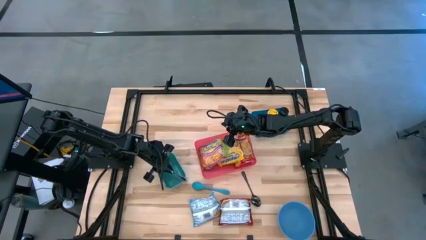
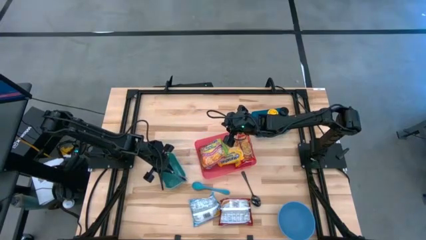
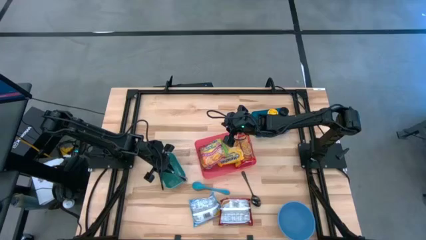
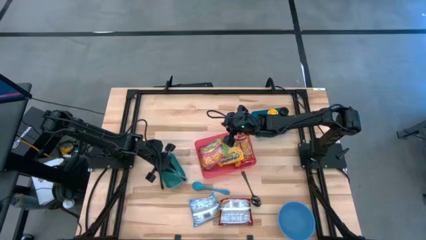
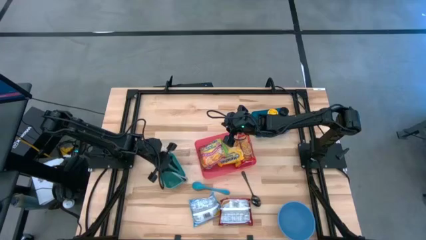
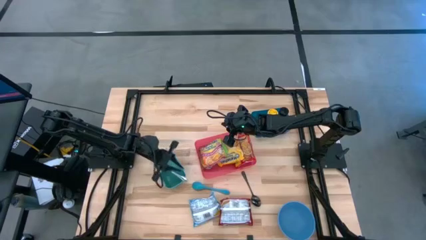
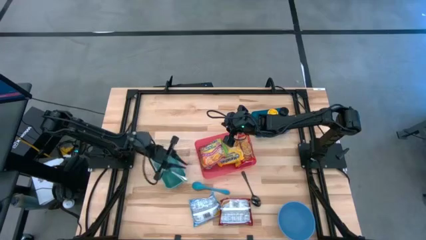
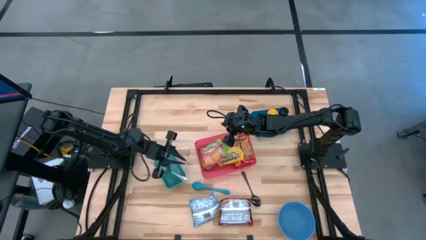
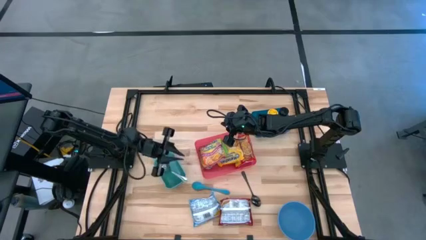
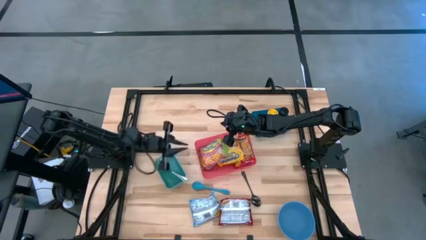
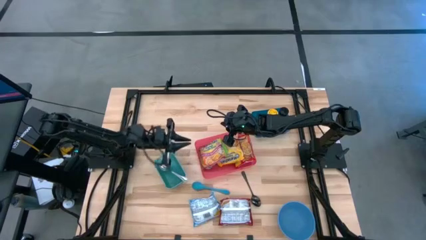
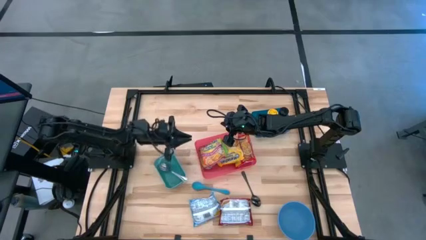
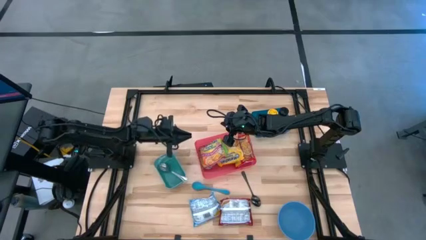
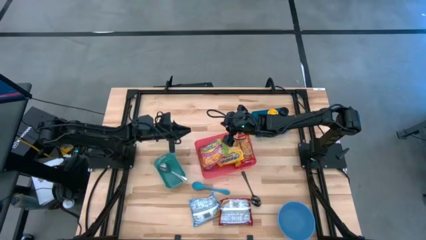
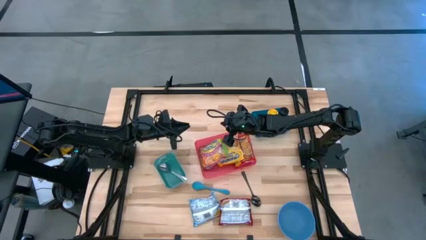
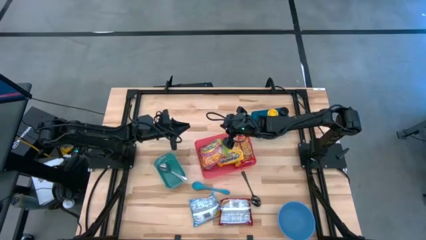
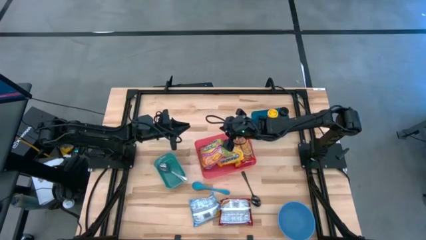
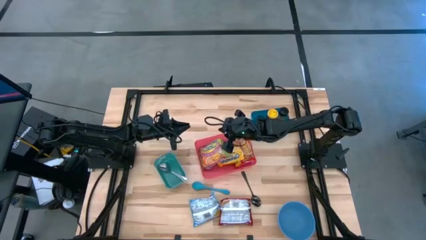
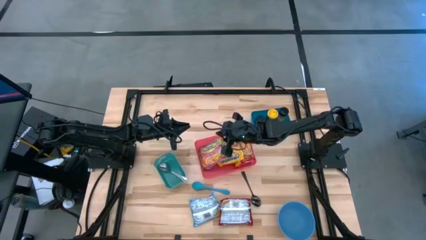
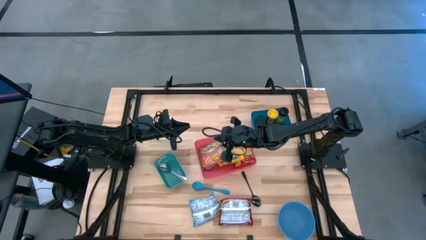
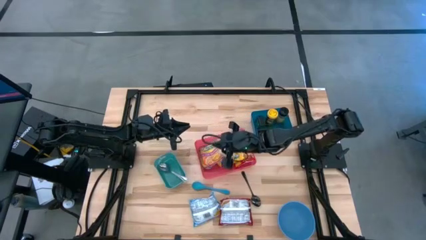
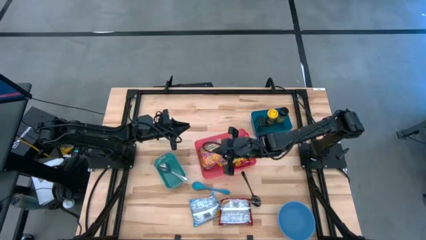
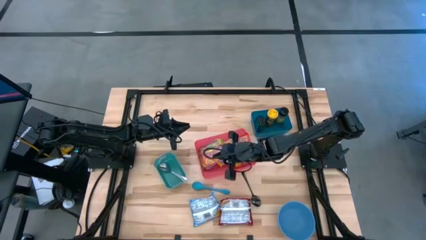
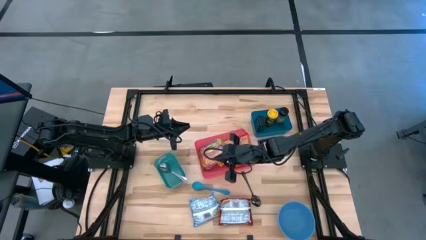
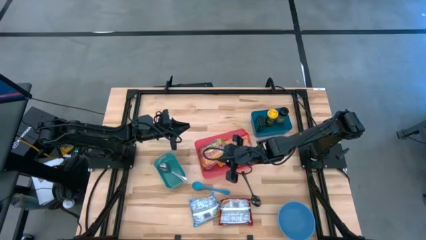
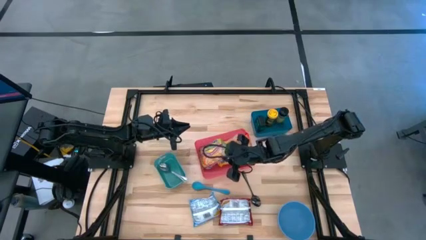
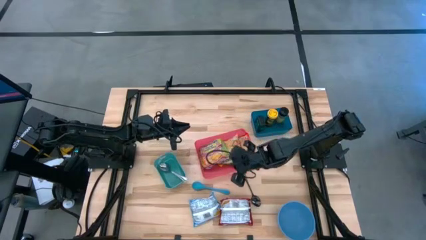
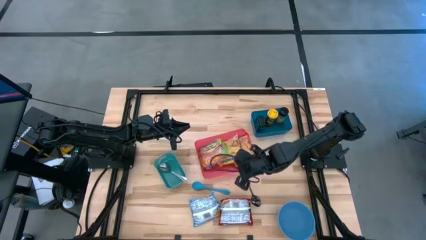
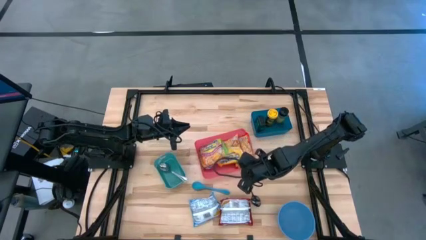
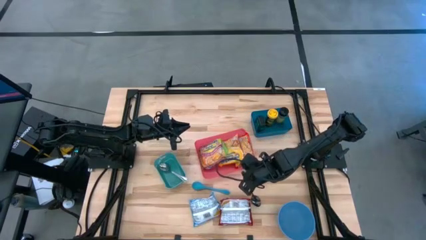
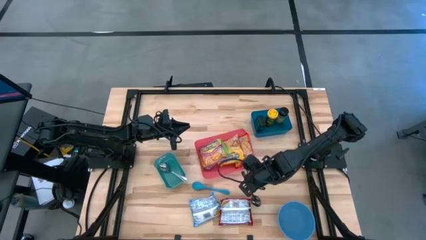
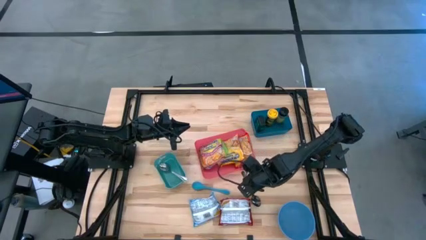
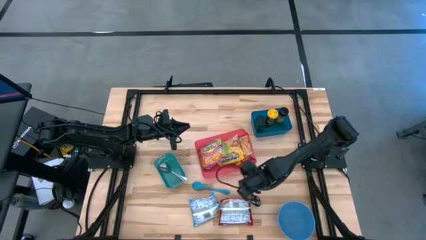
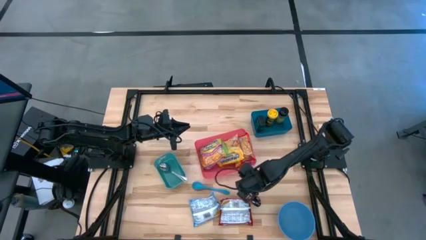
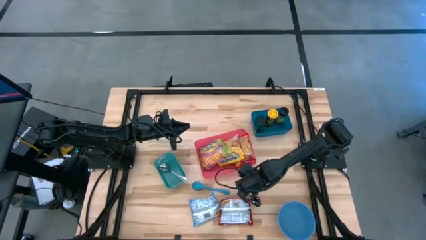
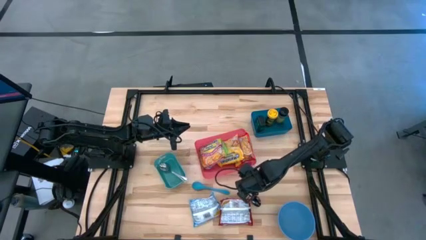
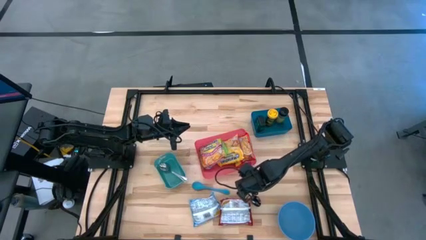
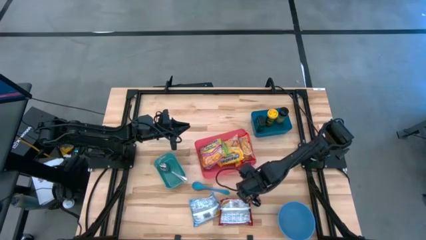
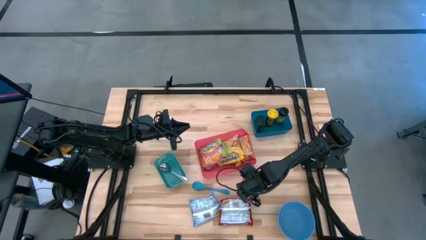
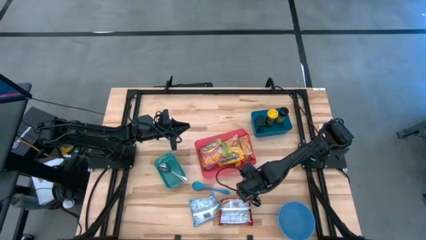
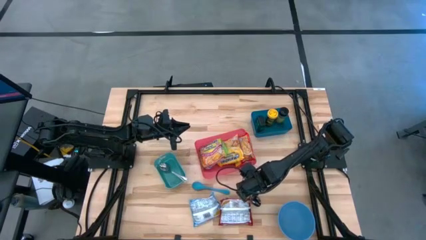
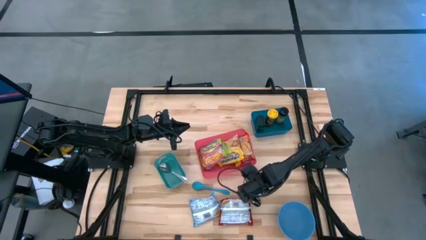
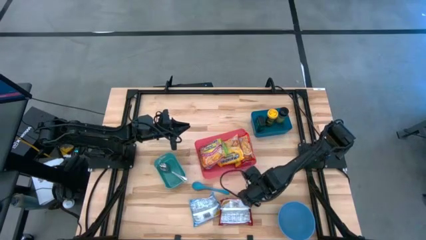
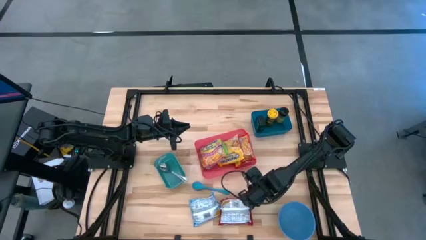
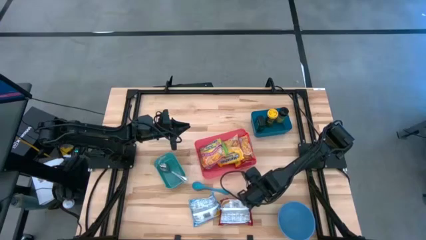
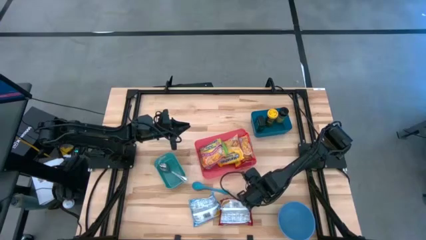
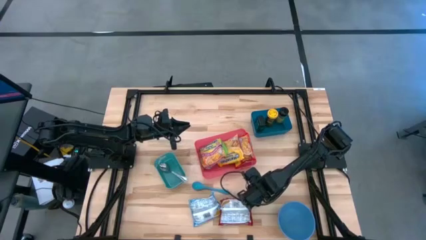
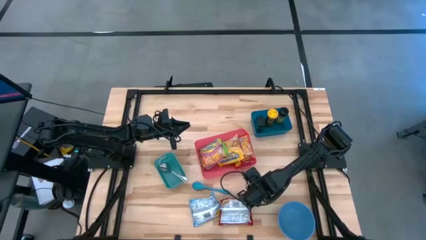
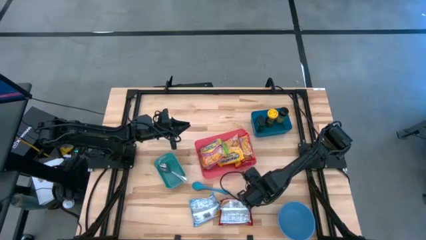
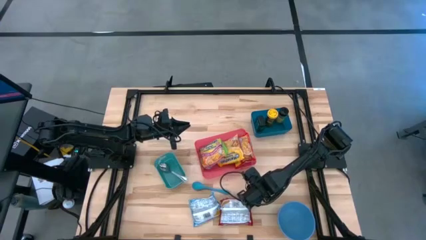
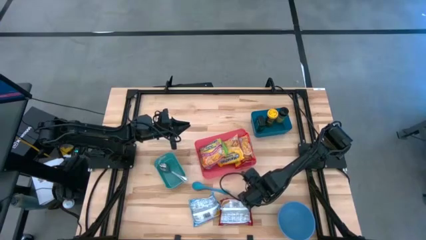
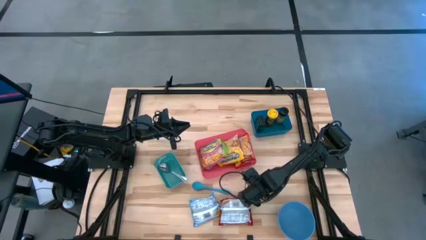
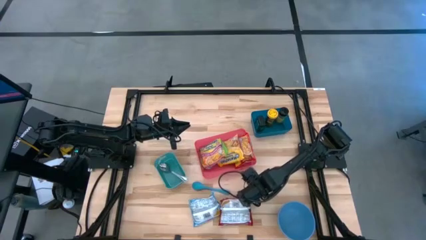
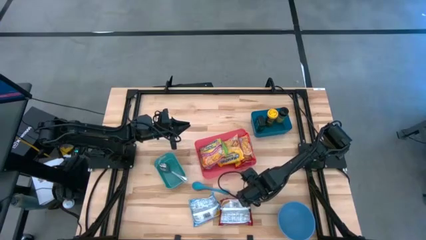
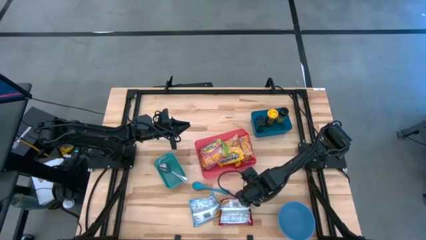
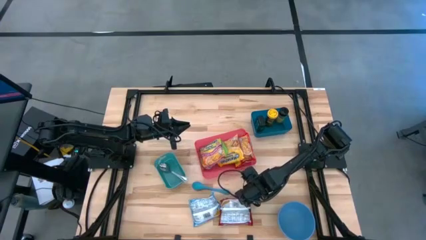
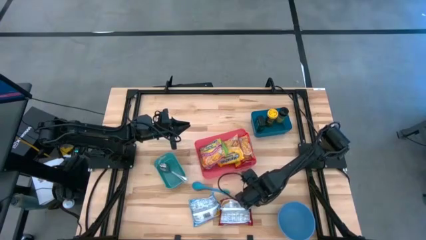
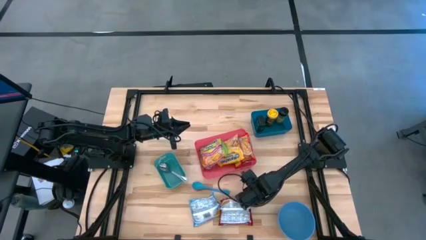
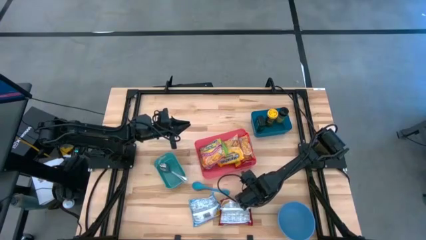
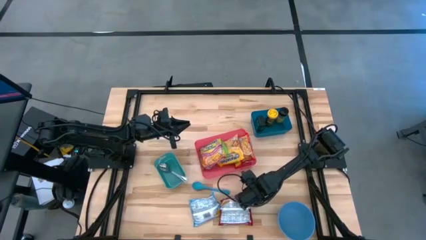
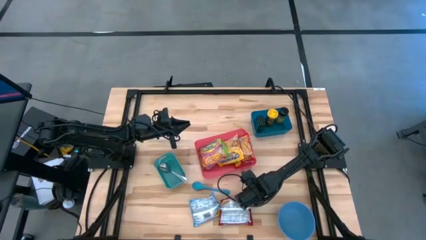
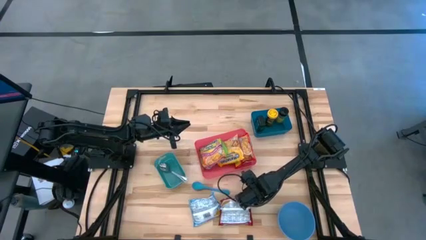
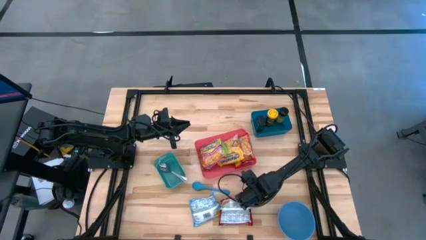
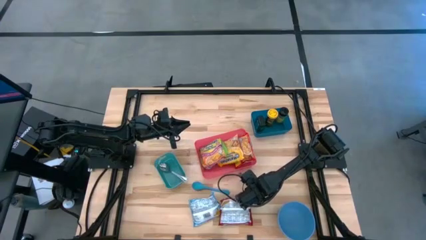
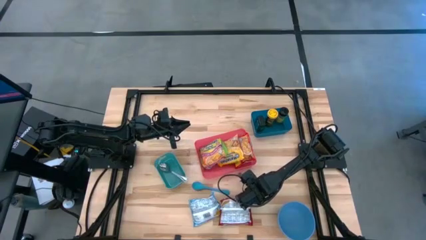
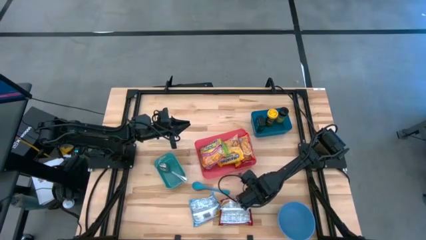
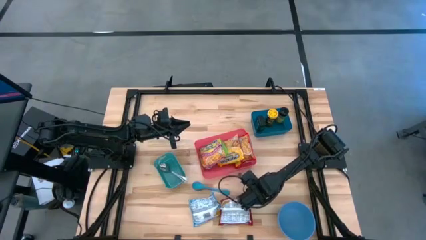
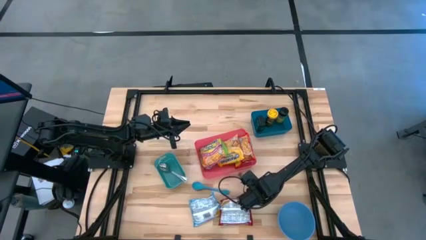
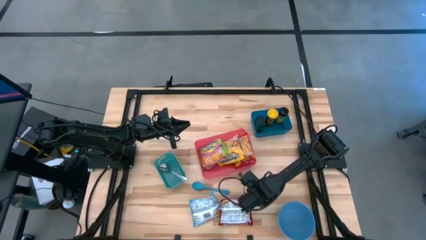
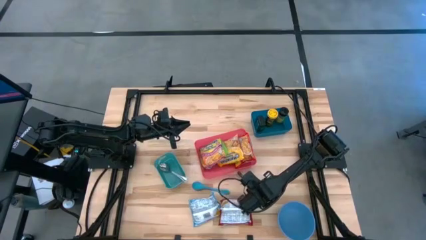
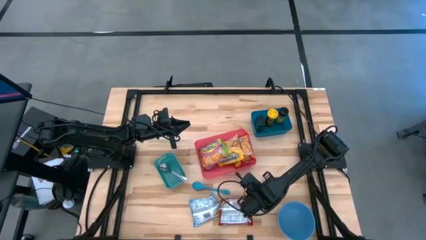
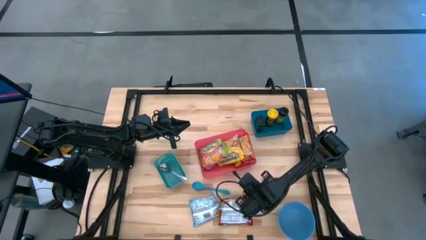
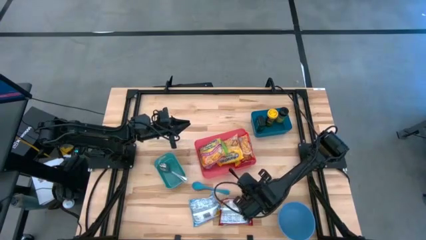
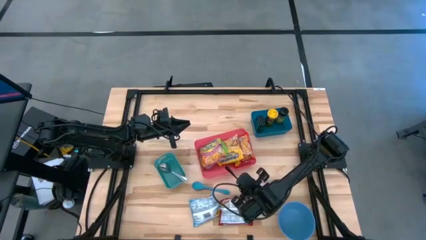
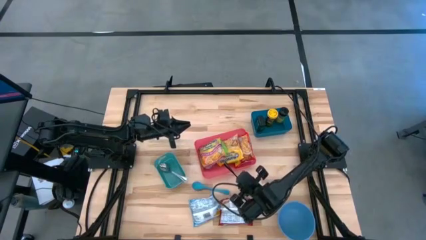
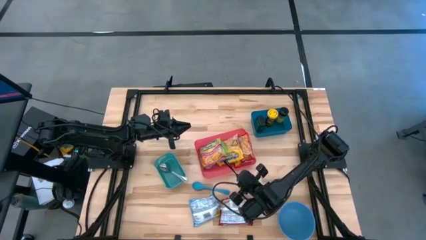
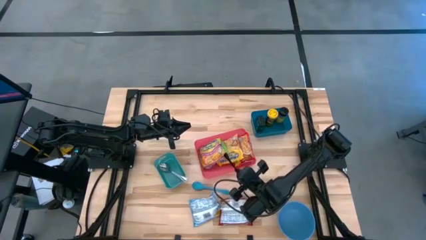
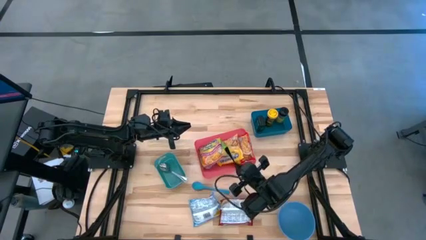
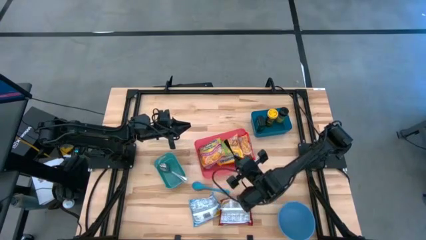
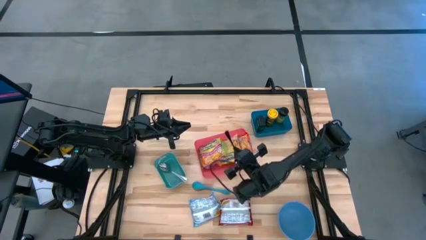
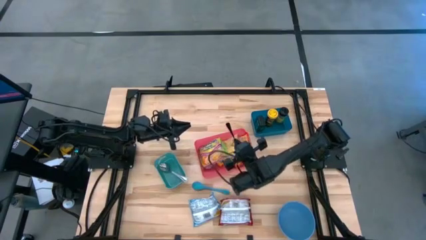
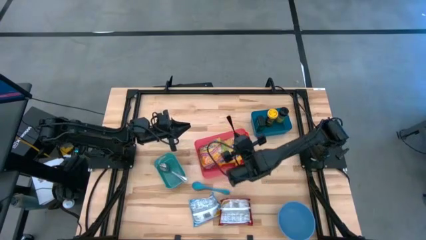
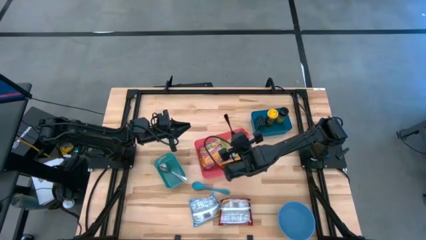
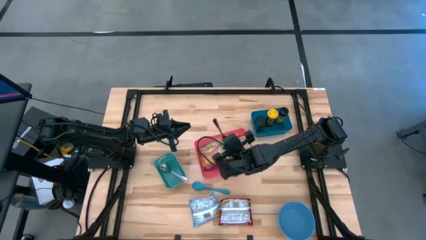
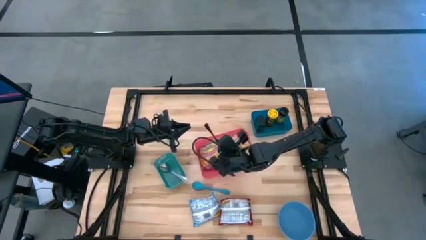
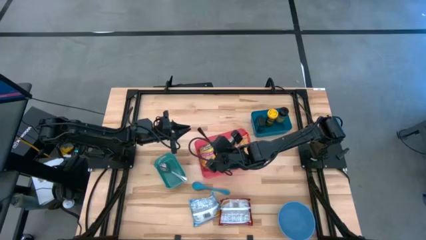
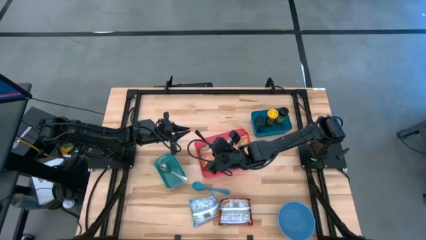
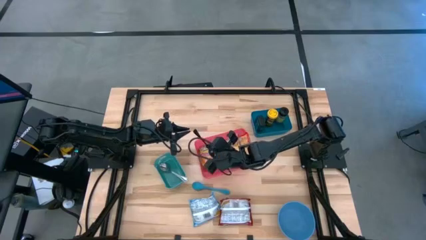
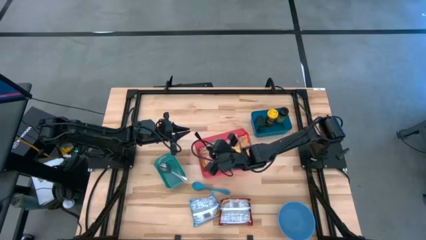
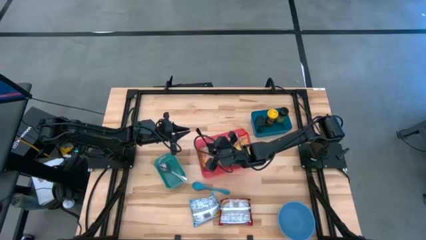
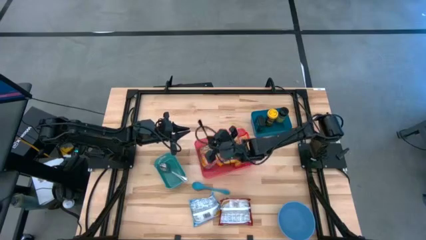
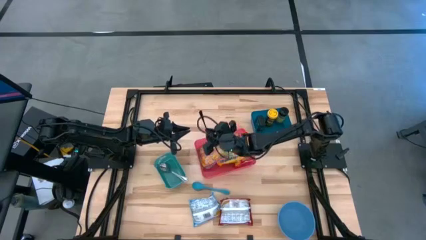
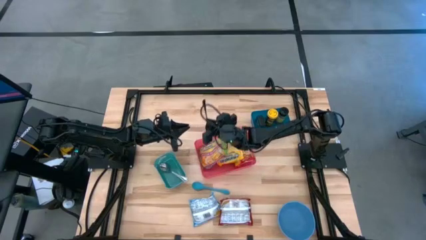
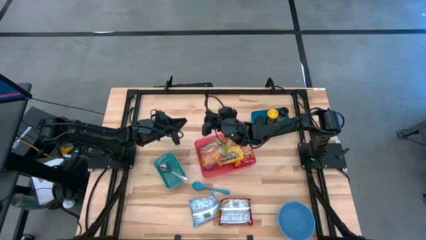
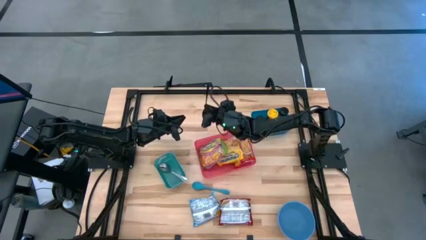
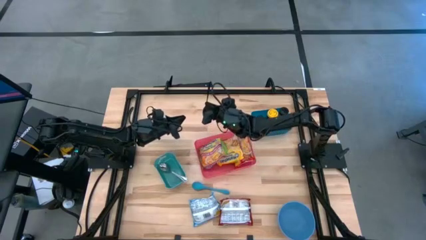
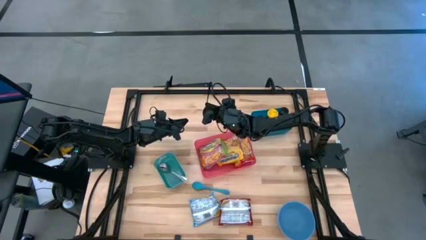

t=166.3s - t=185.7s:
Task: Pick & Place Food Item
Put the black spoon into the green bin
